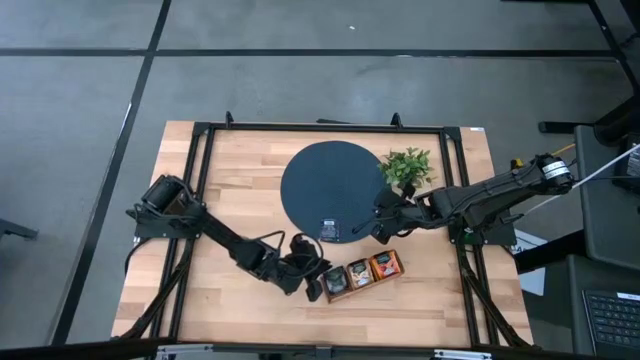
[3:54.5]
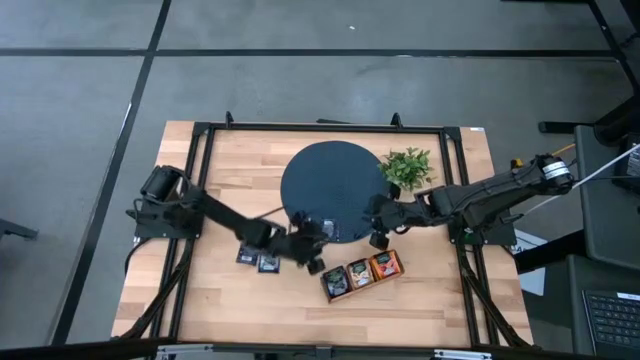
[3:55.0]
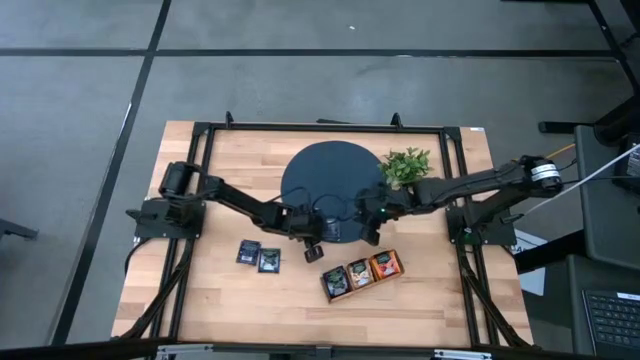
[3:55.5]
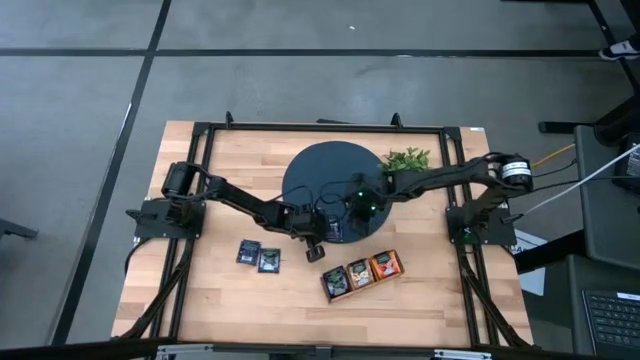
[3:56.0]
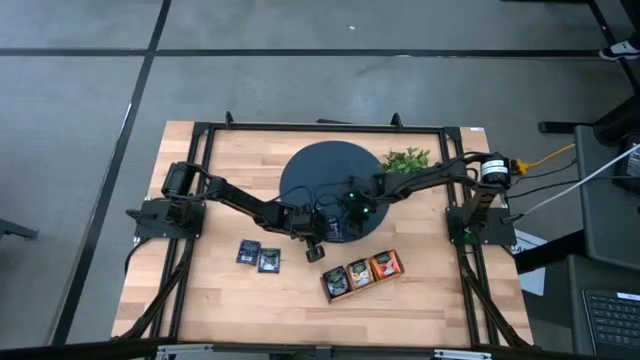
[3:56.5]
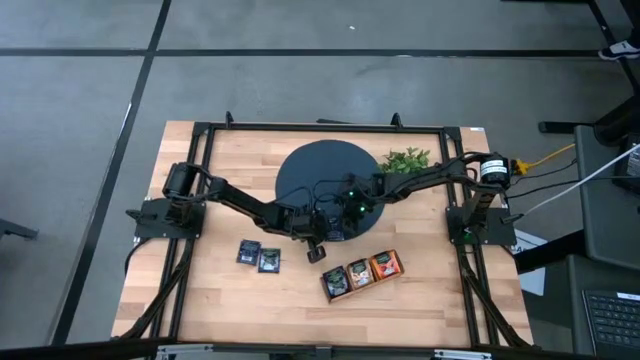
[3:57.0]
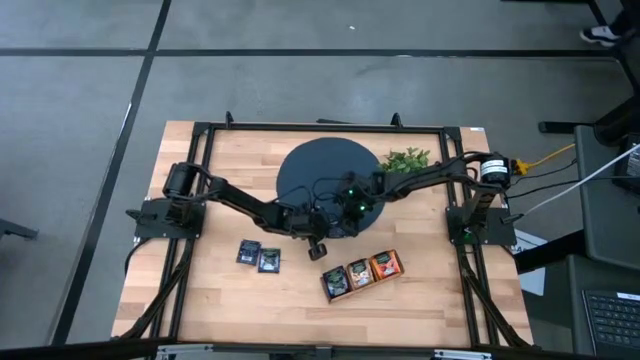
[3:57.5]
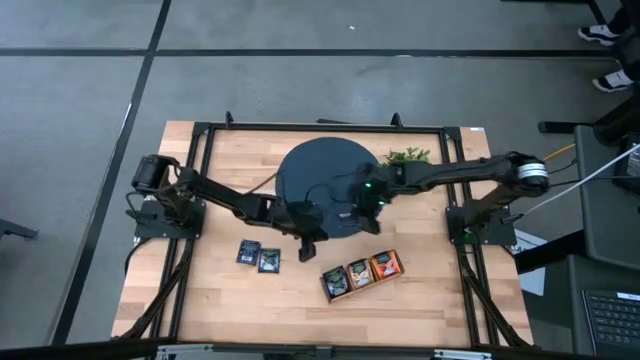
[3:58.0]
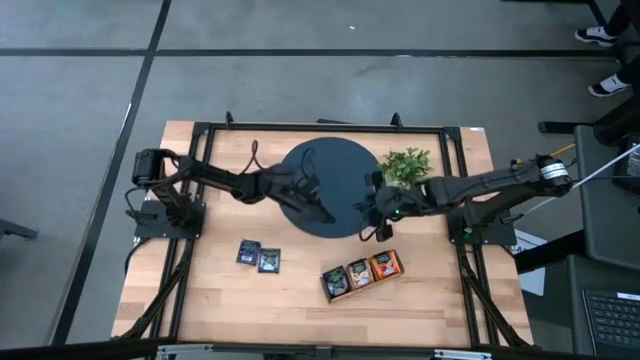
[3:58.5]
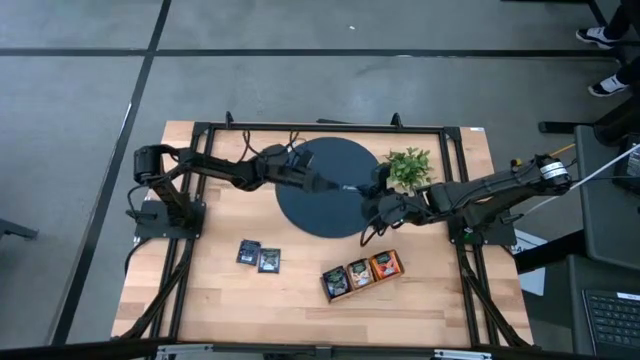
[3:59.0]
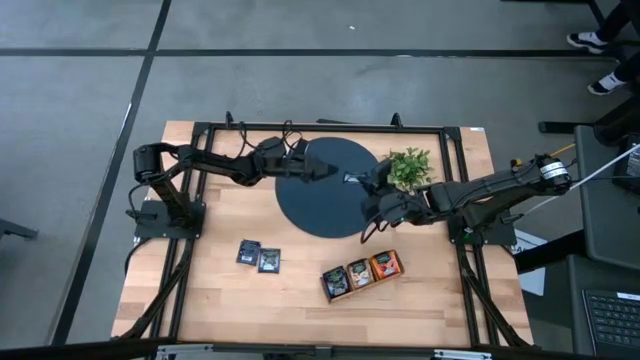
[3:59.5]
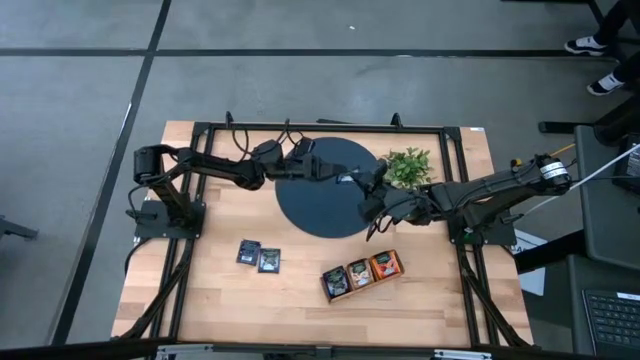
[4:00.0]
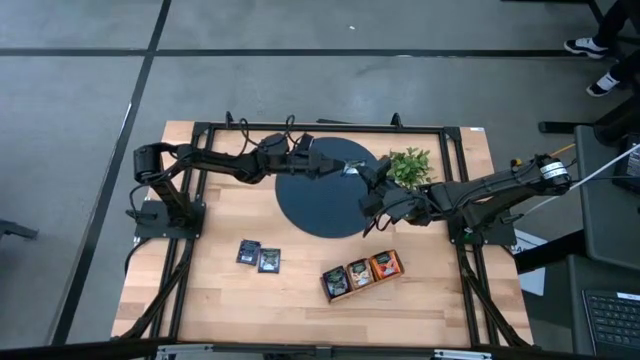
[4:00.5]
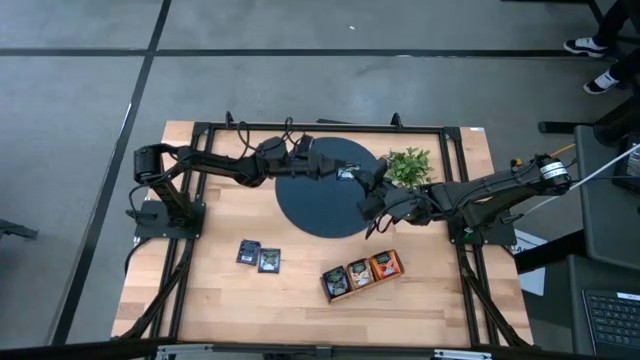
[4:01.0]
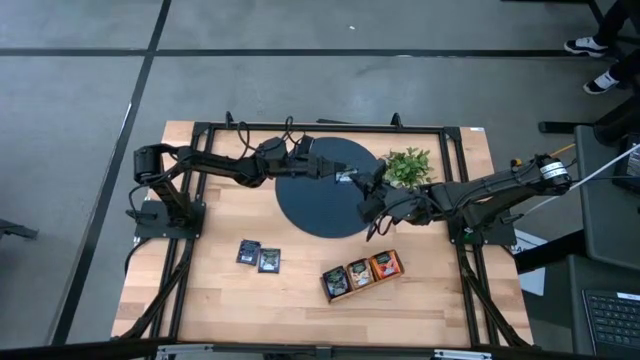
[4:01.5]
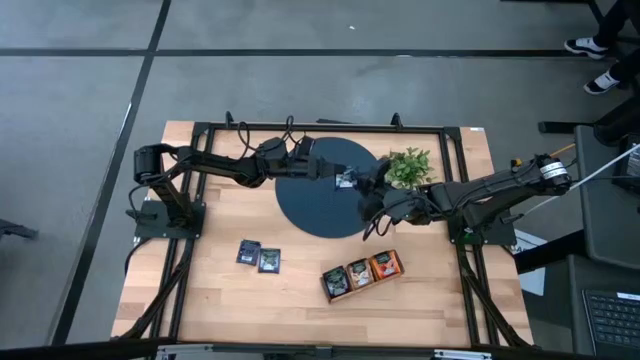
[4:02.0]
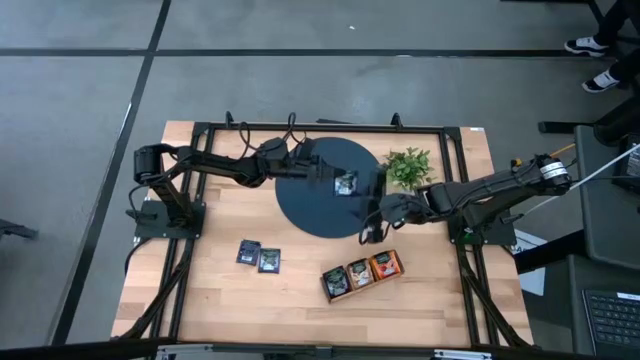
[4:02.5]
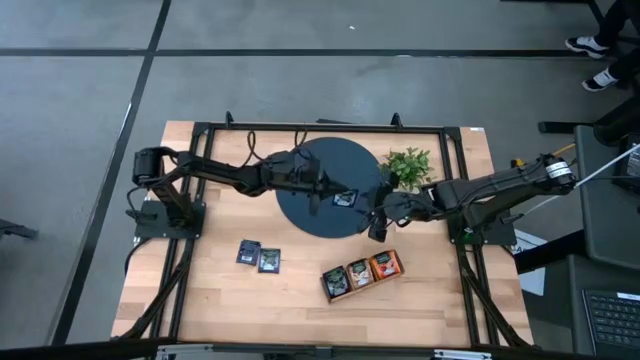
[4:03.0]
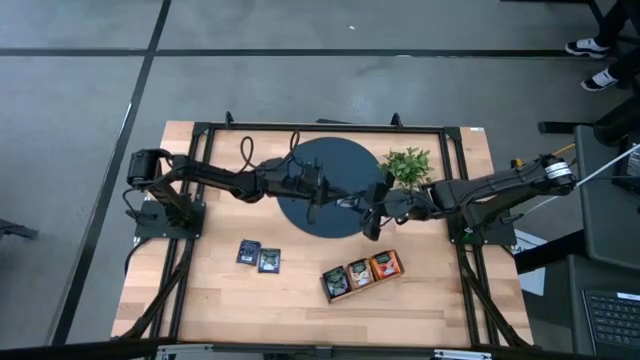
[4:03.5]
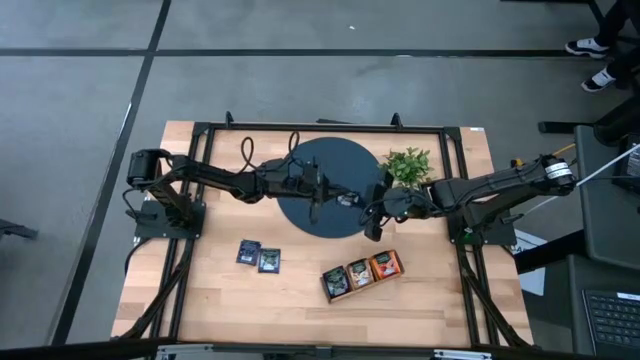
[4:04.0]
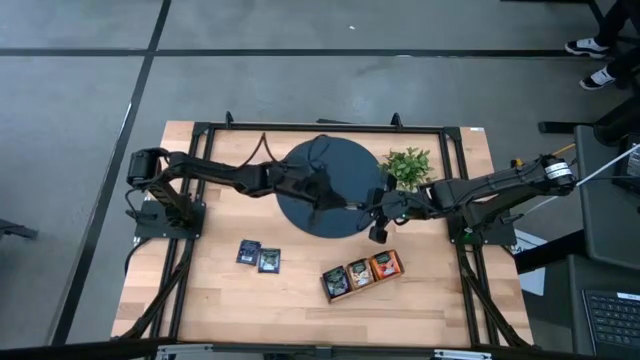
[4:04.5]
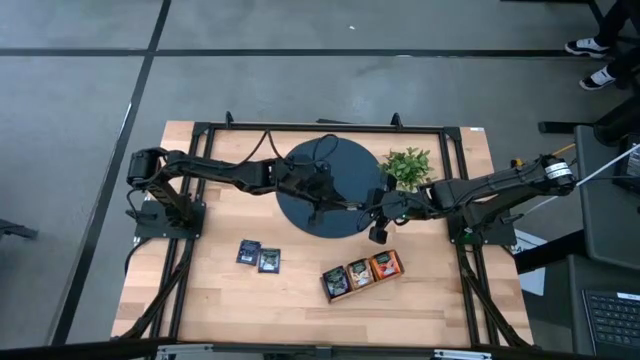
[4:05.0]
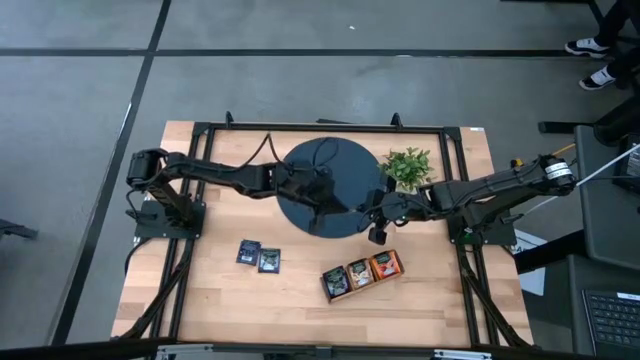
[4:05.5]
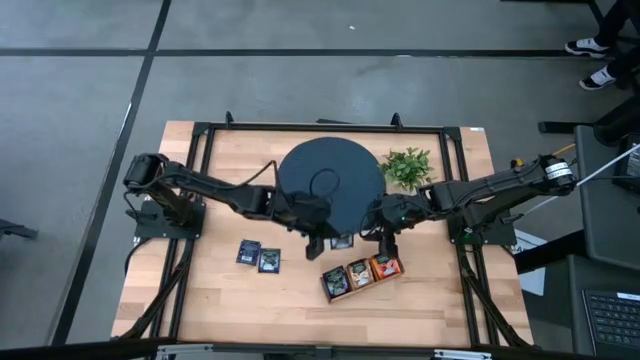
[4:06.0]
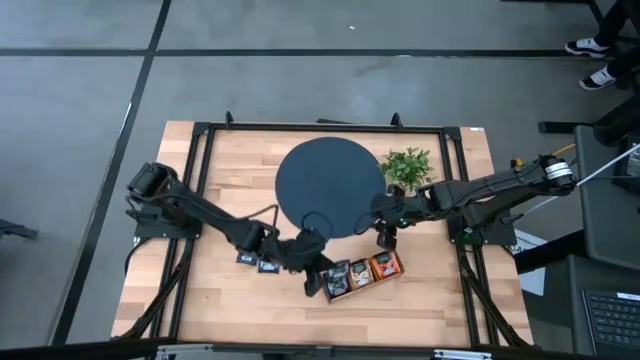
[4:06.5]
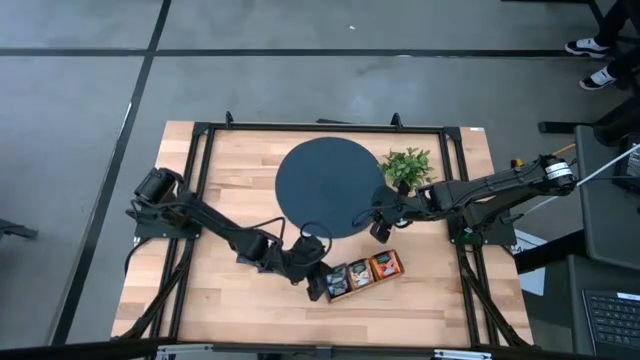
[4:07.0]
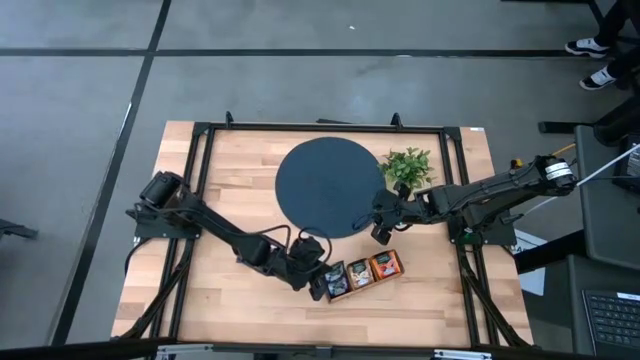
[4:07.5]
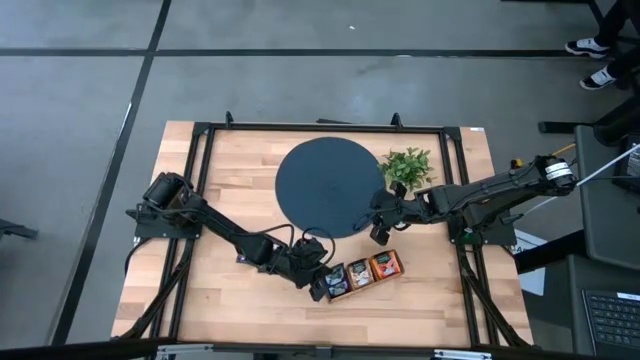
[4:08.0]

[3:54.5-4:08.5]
Task: Pick & Place Tea
Put the purple tea bag into the left section of the wooden organizer

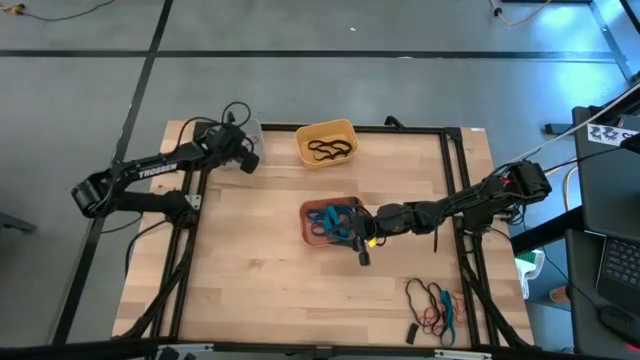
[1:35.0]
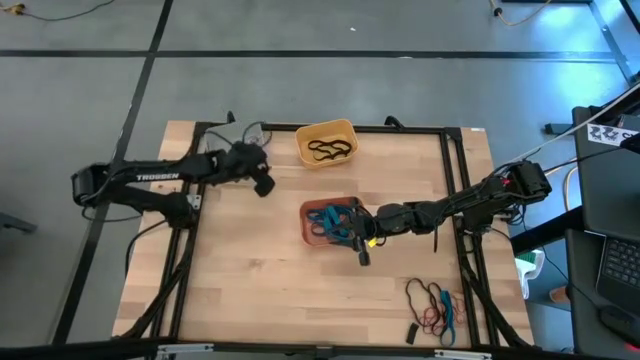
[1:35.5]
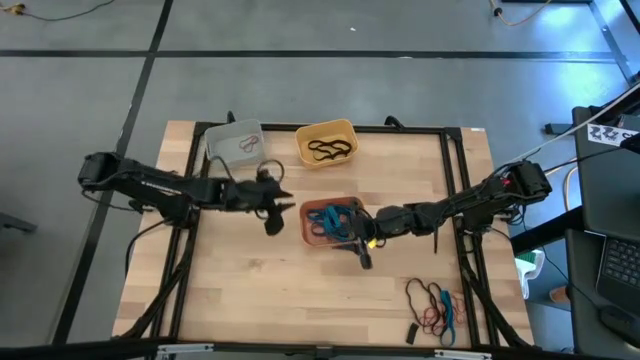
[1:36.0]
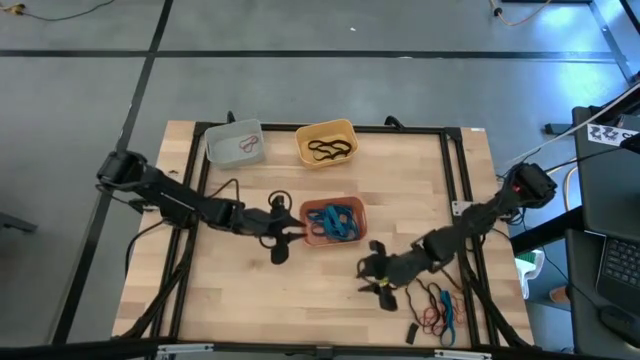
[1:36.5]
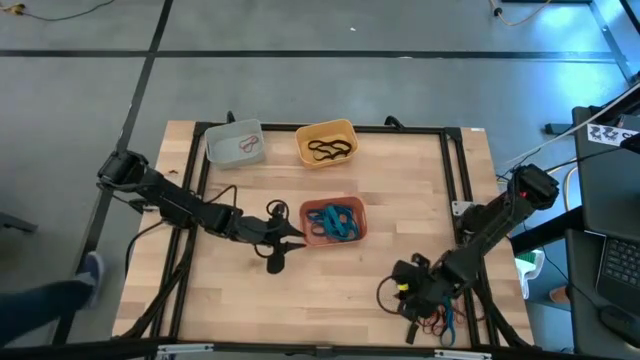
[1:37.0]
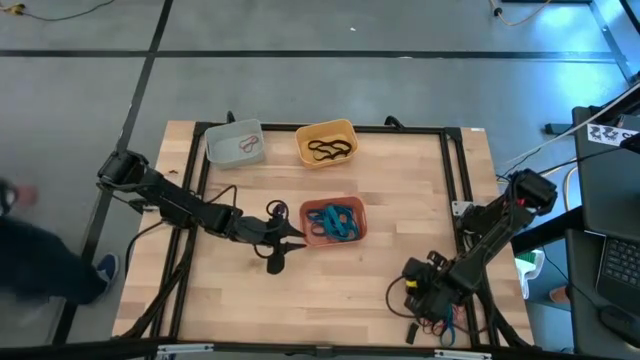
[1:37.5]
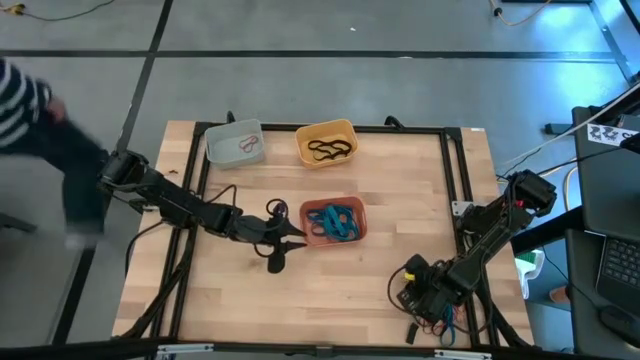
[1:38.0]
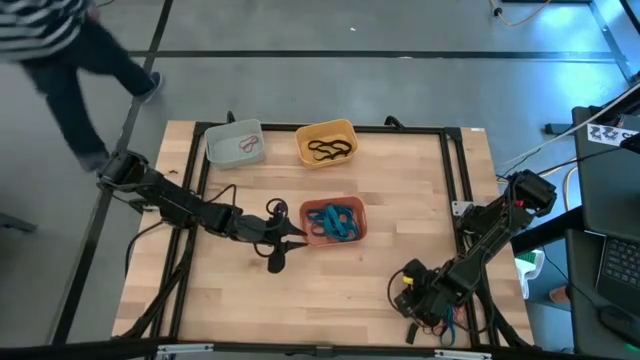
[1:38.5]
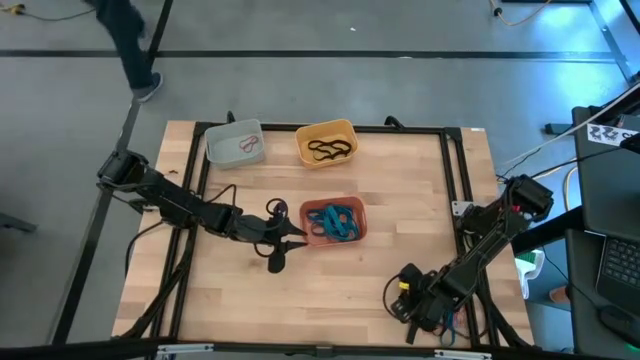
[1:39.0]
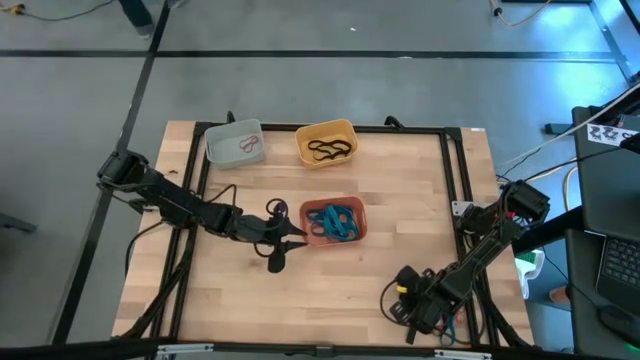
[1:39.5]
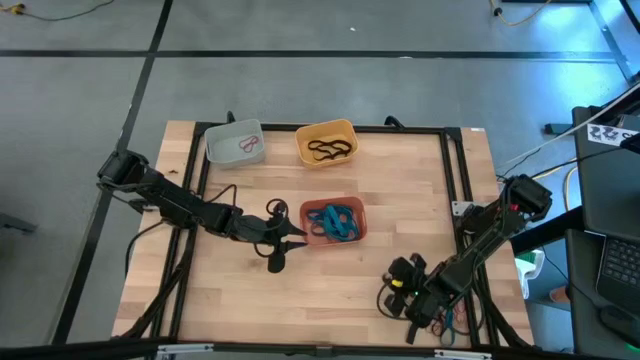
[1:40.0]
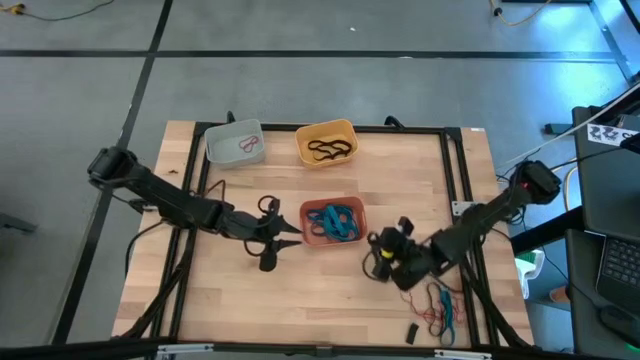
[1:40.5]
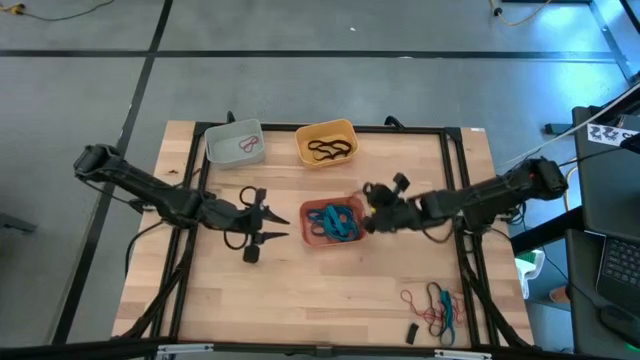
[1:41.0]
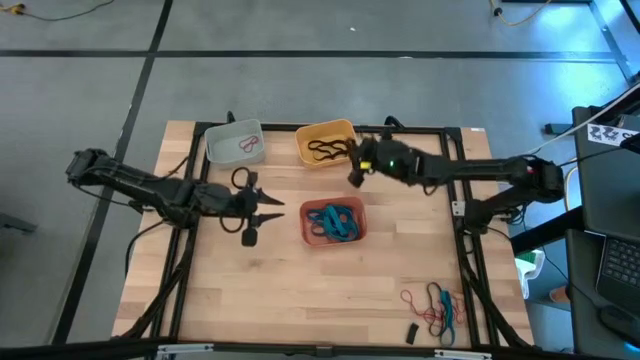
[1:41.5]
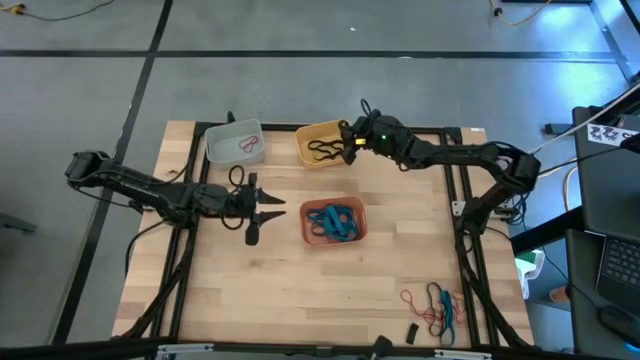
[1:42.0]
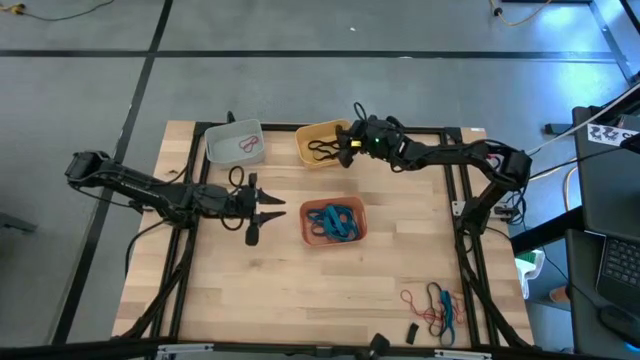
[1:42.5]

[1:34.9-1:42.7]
Task: Sort rubber bands into baskets
Put the black rubber band into the yellow bin
